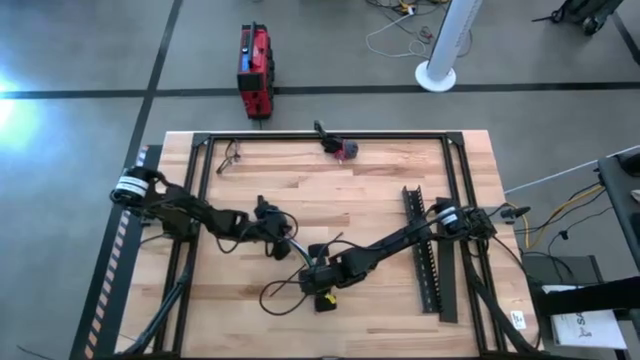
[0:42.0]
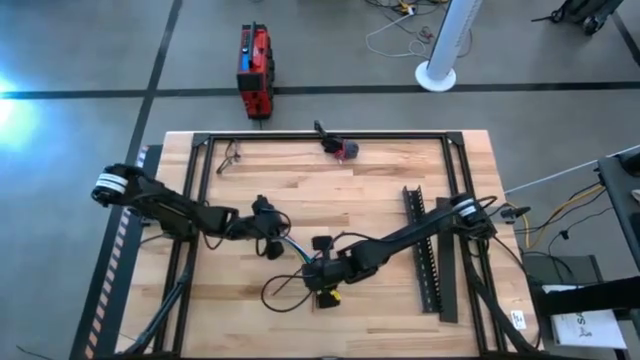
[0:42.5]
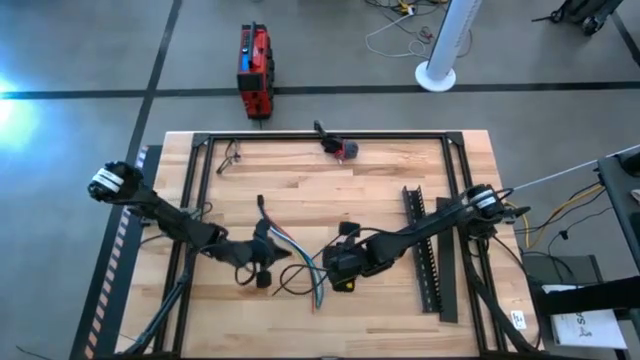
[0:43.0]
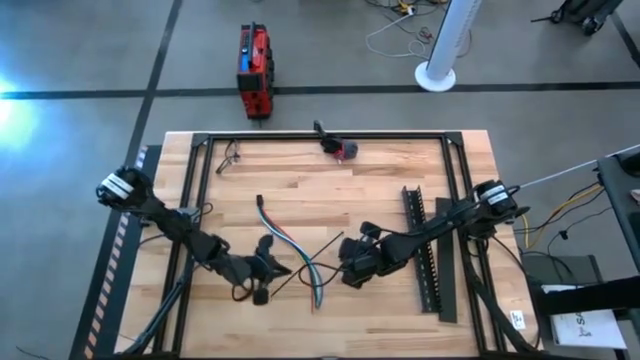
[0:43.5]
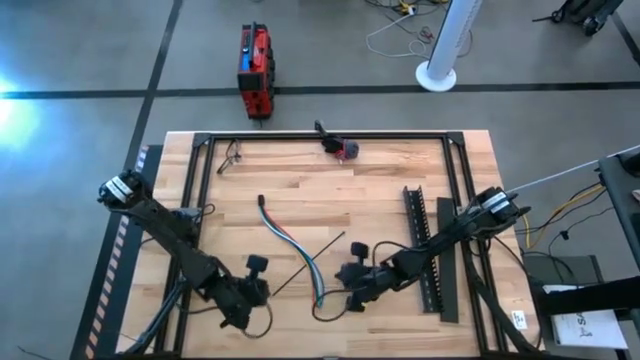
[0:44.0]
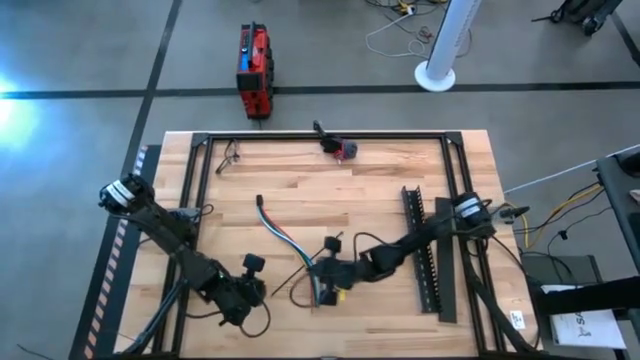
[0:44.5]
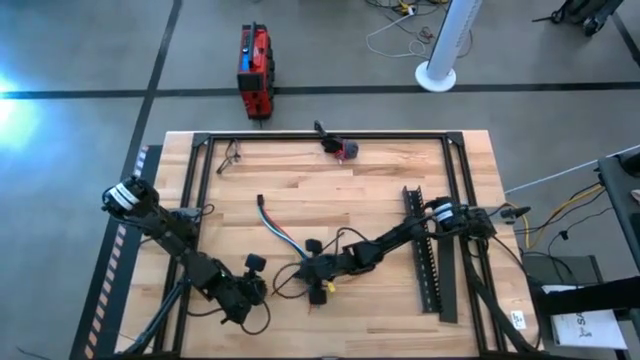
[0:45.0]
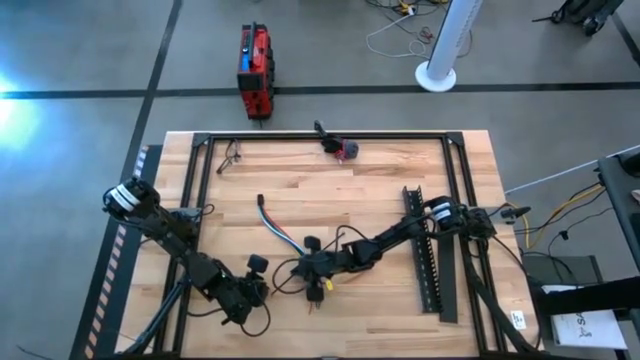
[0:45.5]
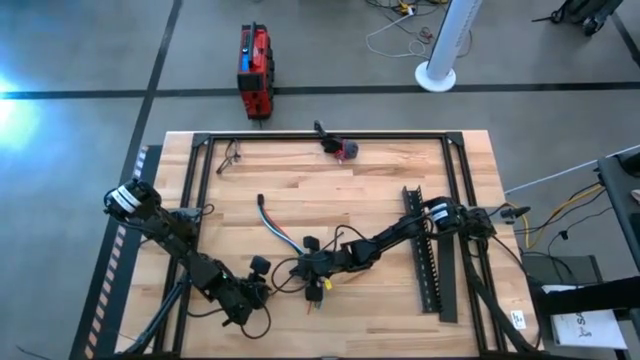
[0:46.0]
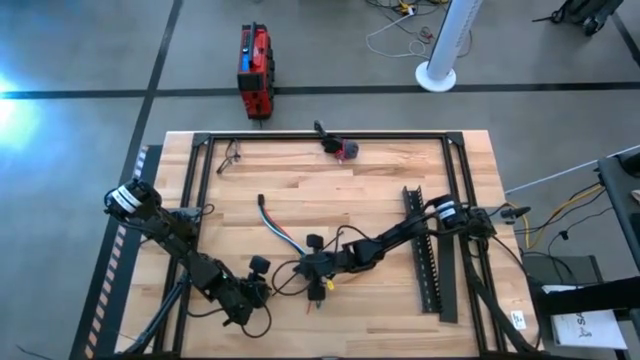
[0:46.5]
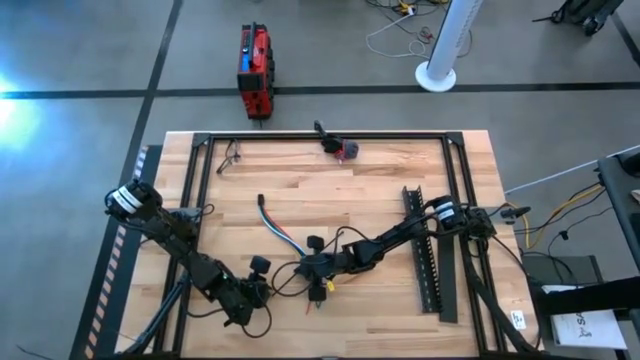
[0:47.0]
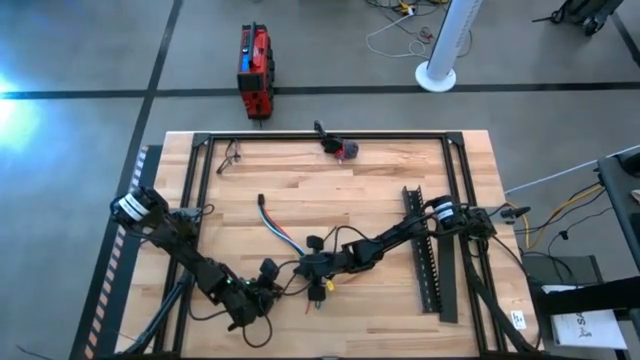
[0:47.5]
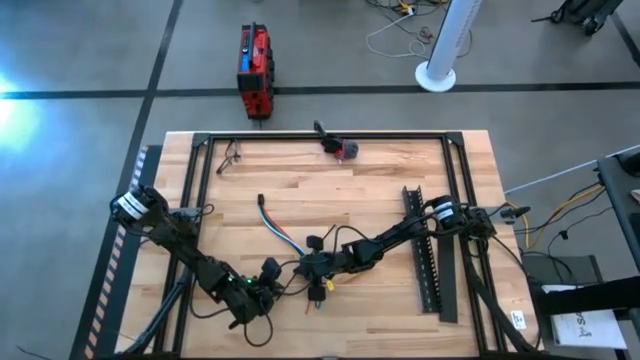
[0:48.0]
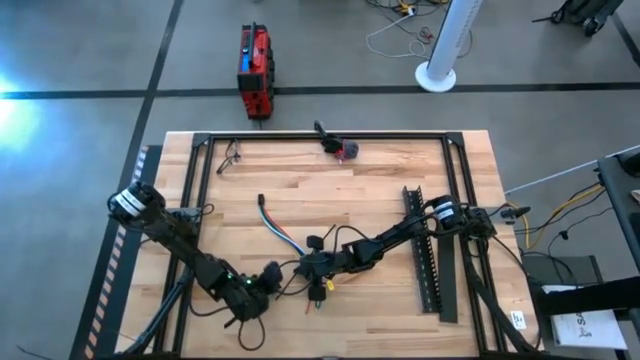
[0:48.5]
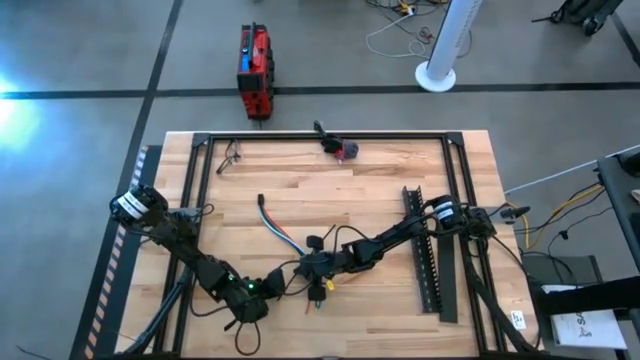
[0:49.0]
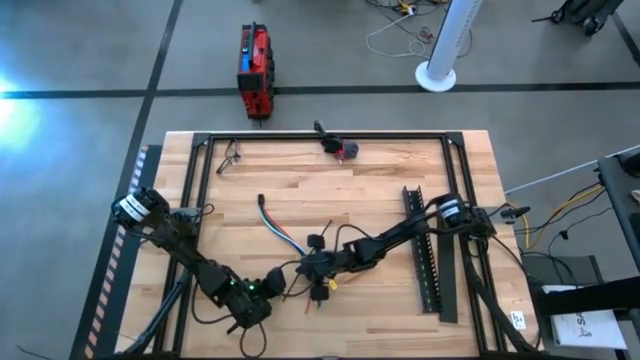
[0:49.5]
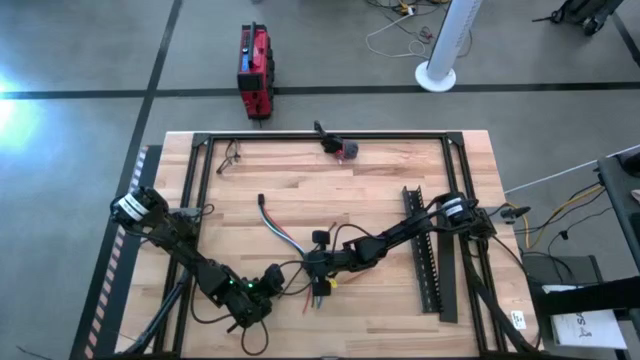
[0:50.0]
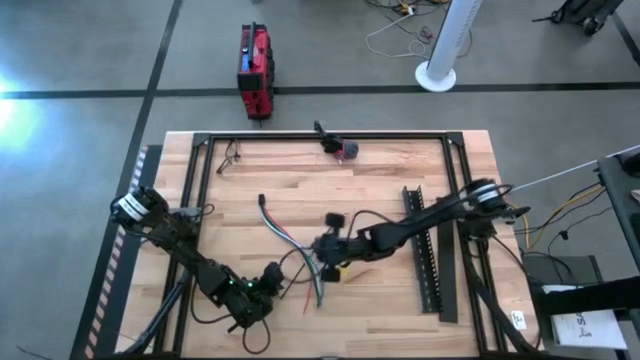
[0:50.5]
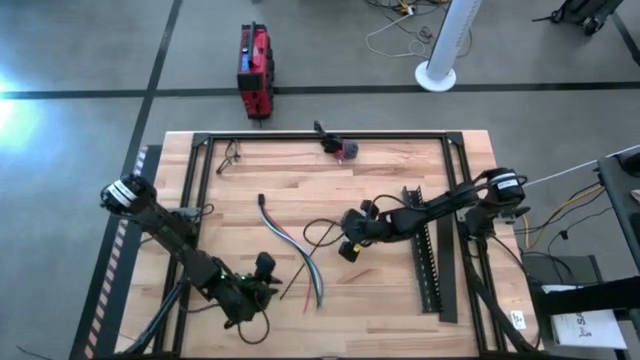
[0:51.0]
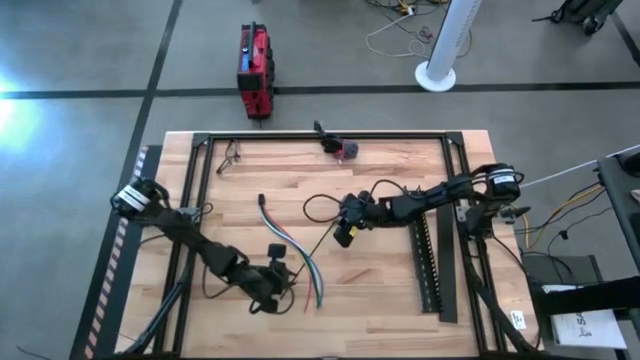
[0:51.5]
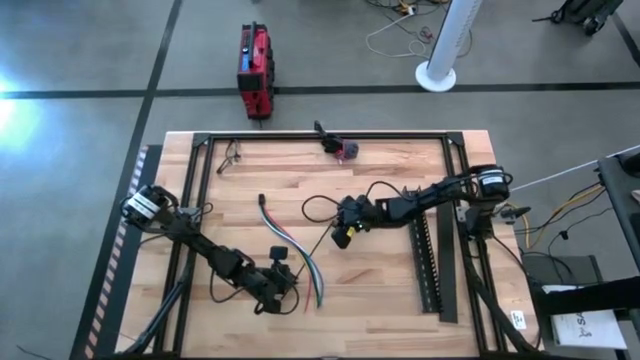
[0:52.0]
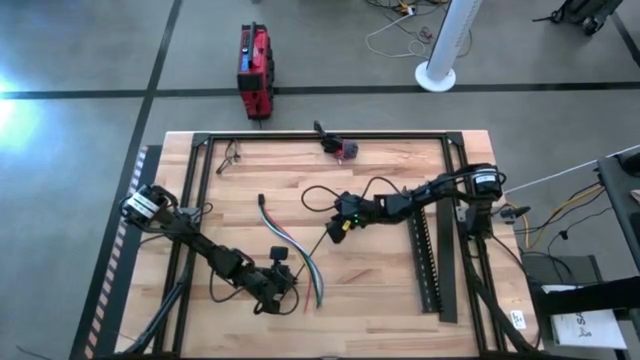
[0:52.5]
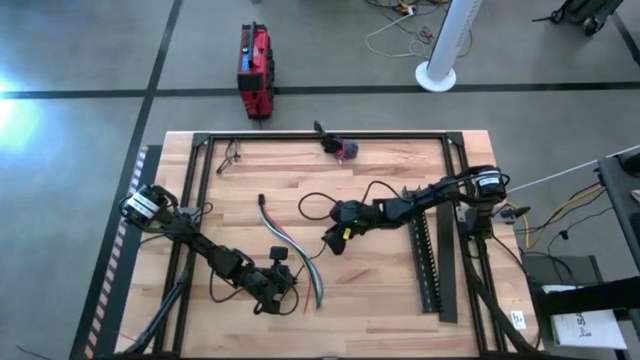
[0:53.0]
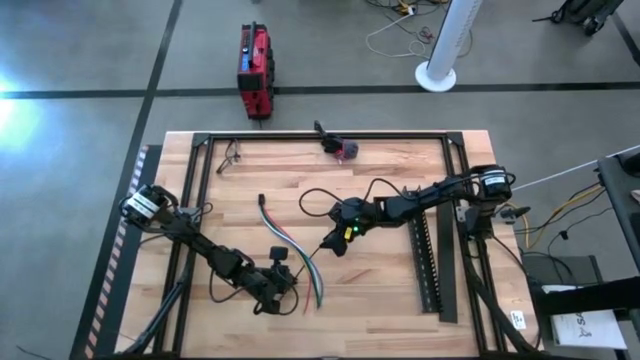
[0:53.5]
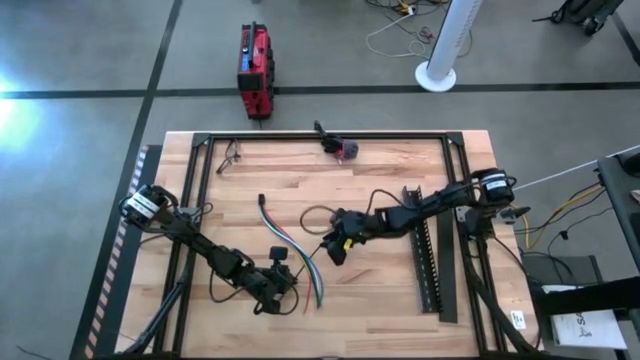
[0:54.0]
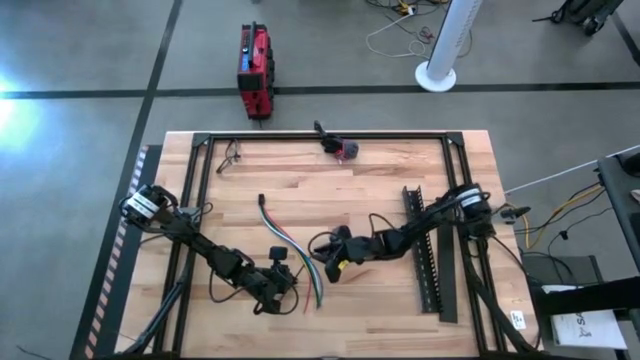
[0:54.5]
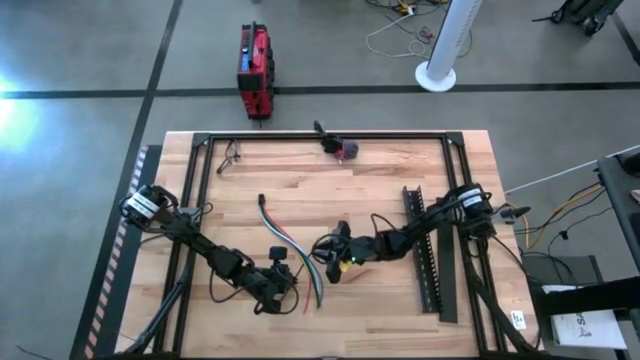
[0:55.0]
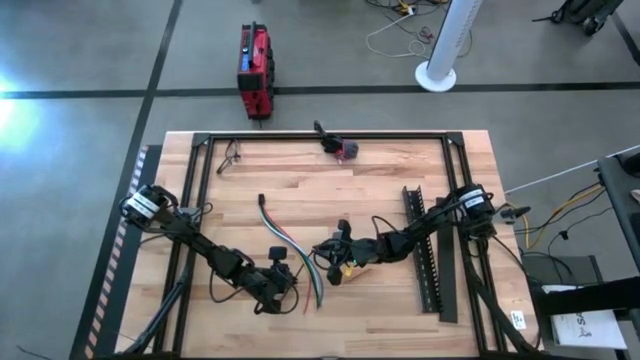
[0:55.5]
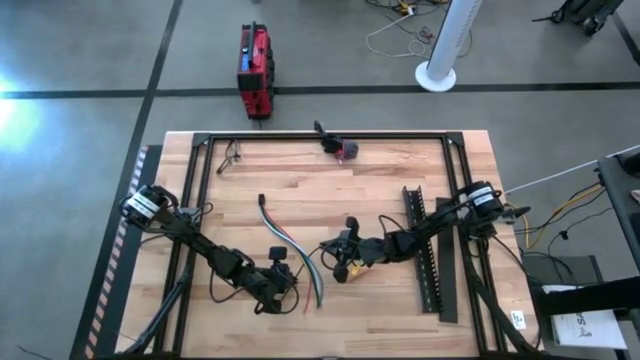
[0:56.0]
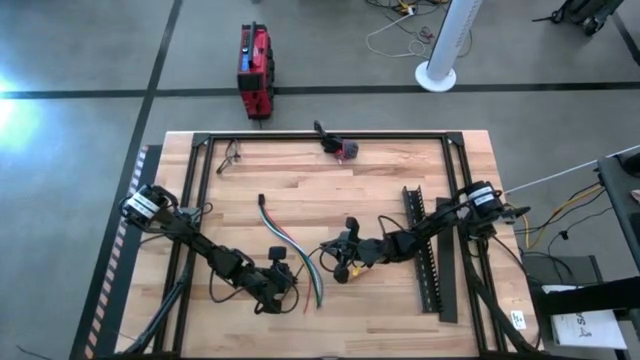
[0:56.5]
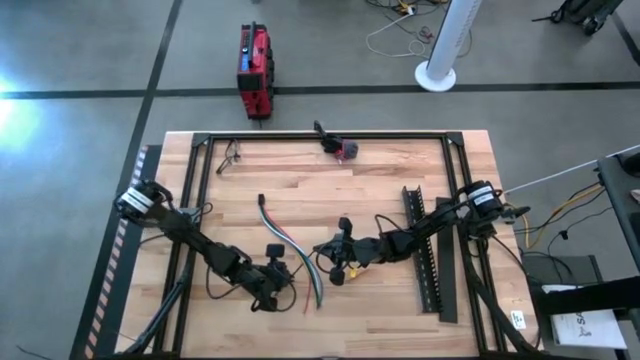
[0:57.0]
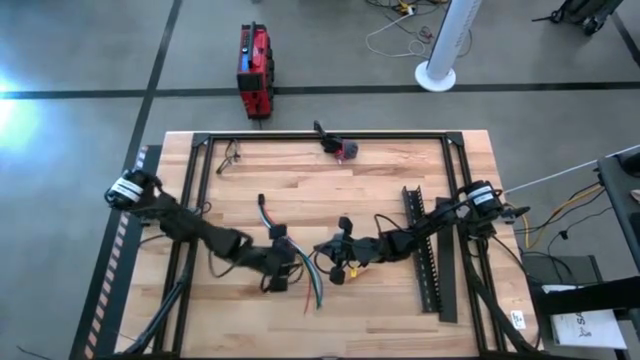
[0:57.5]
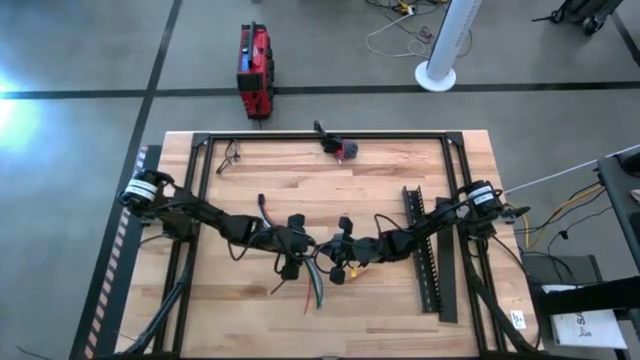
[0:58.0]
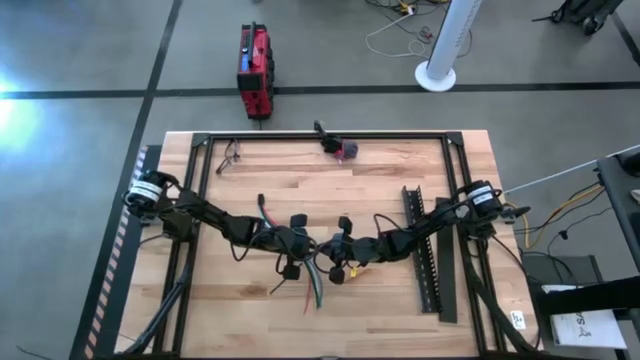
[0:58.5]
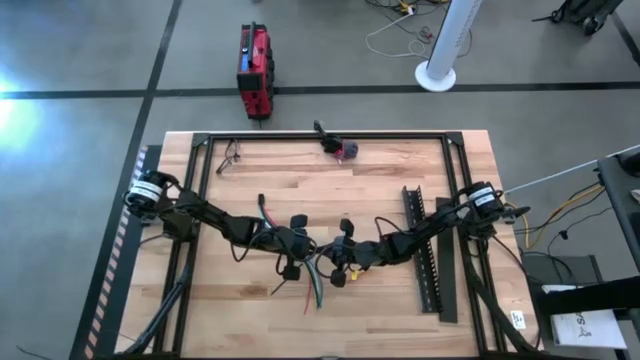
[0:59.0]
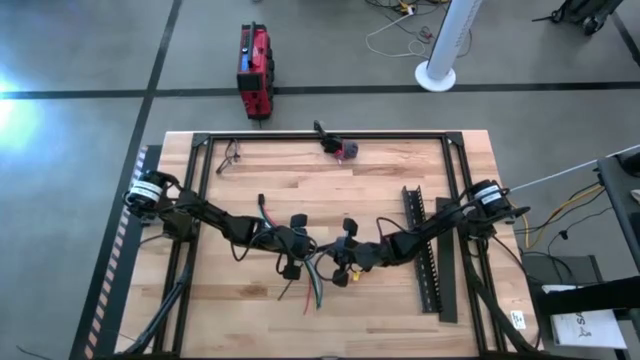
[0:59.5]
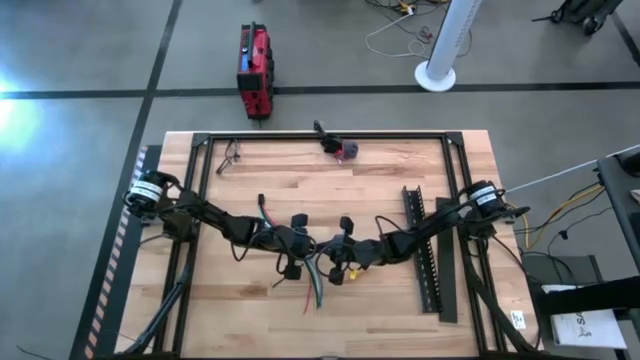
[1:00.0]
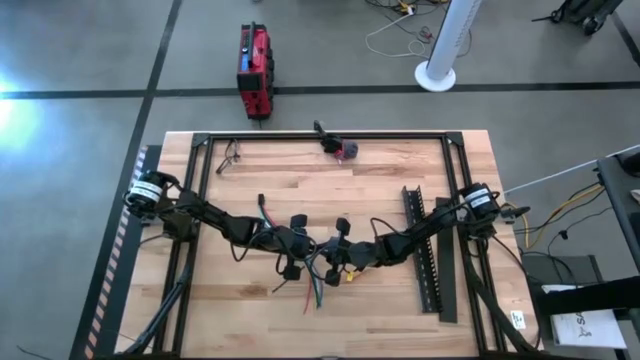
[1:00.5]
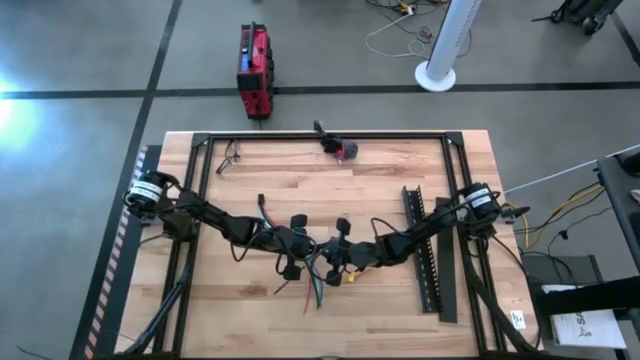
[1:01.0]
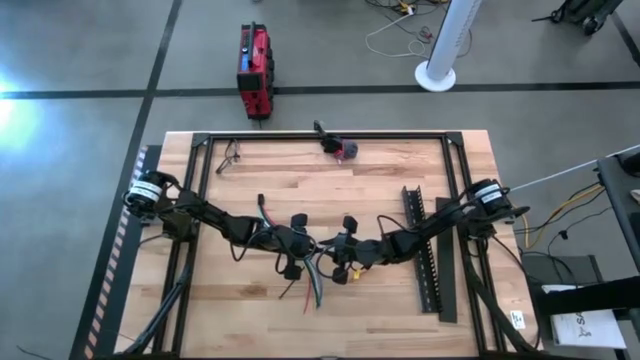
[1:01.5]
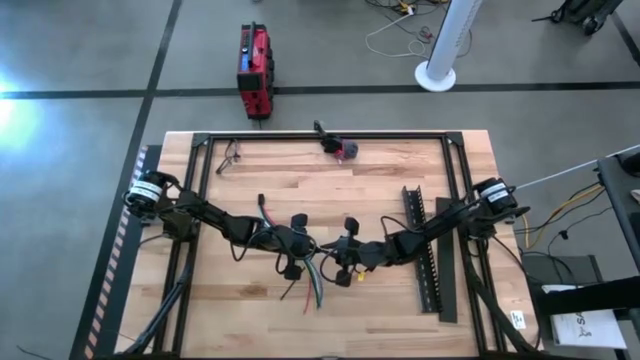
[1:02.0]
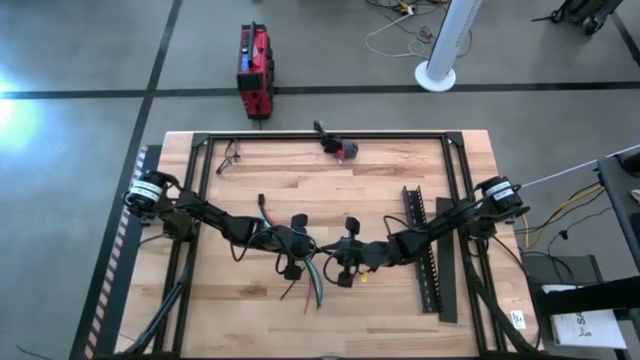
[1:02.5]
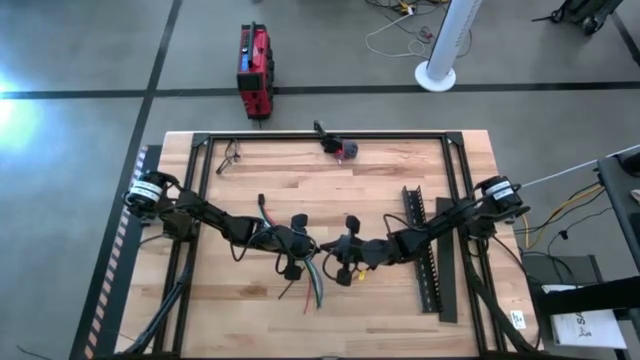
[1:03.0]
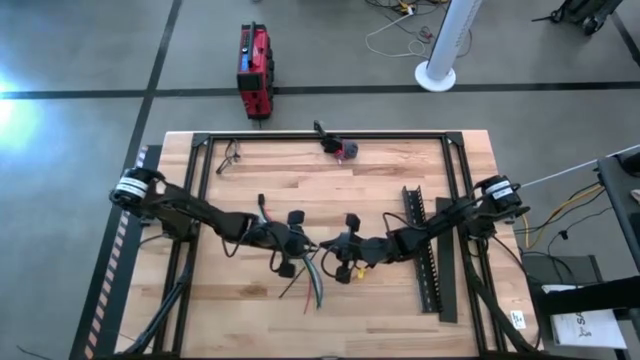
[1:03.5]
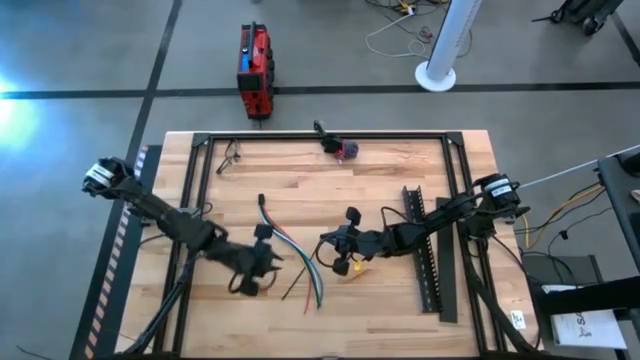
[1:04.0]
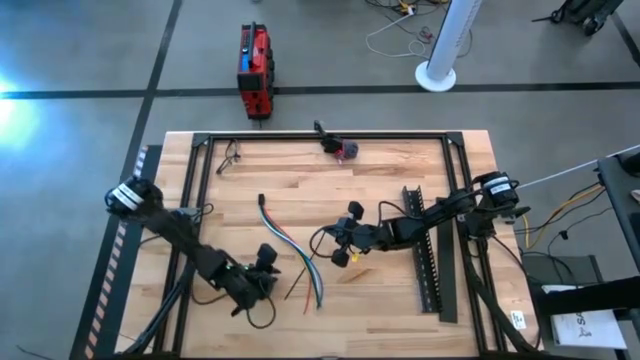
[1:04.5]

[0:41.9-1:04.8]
Task: Ziptie cables
Close the cables together using a zip tie
